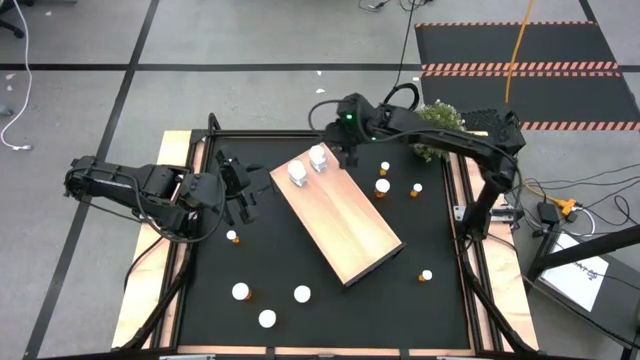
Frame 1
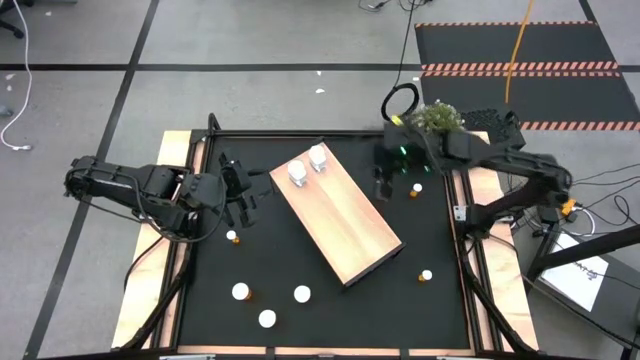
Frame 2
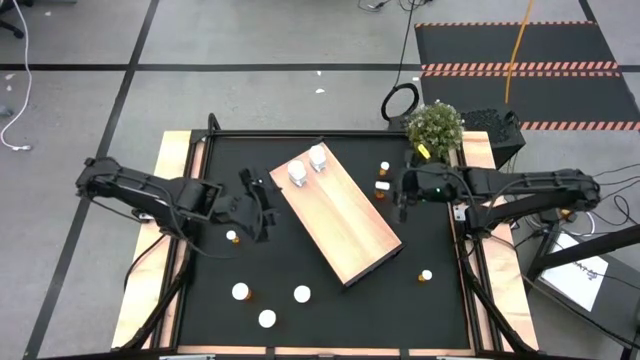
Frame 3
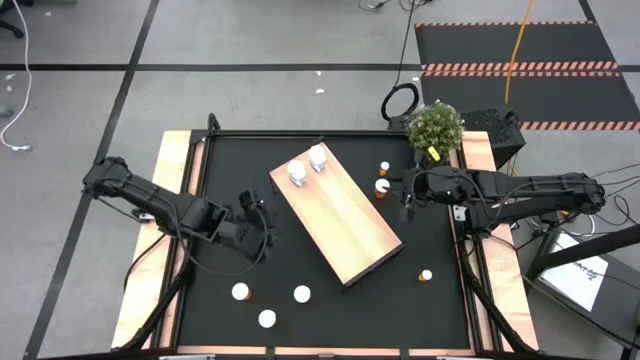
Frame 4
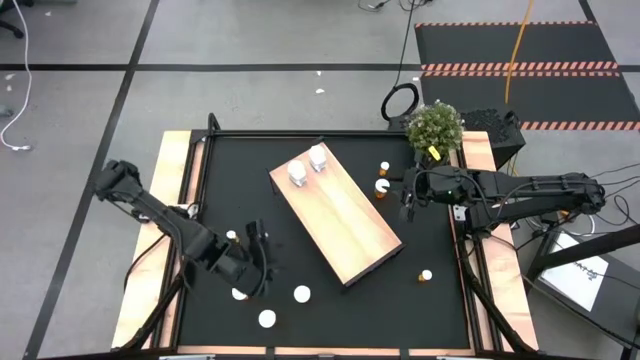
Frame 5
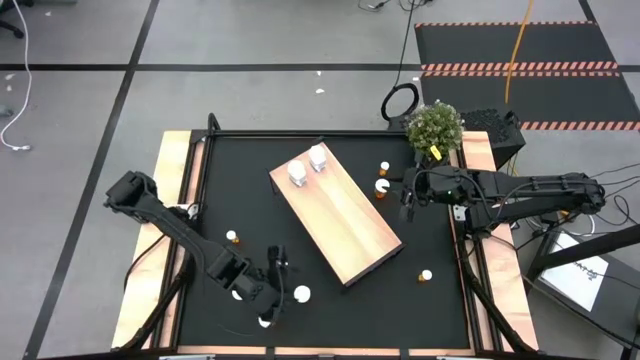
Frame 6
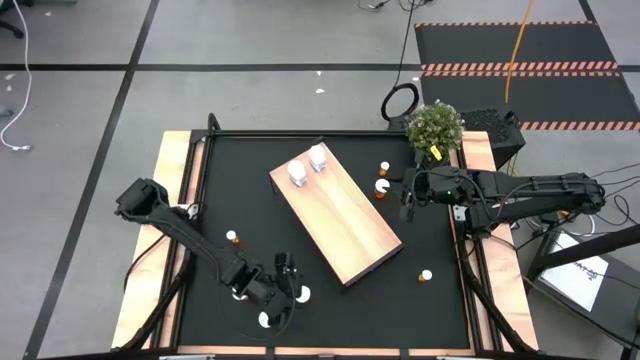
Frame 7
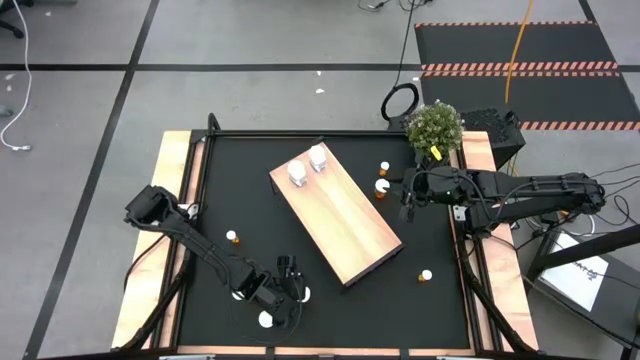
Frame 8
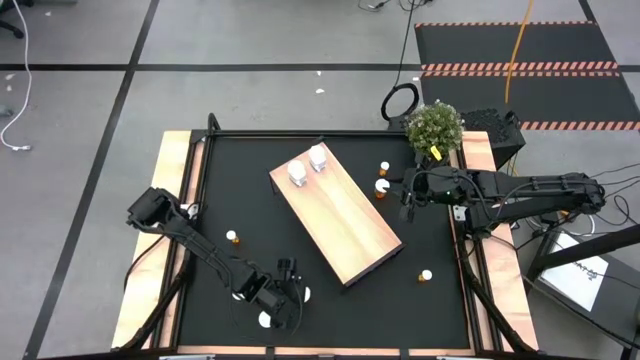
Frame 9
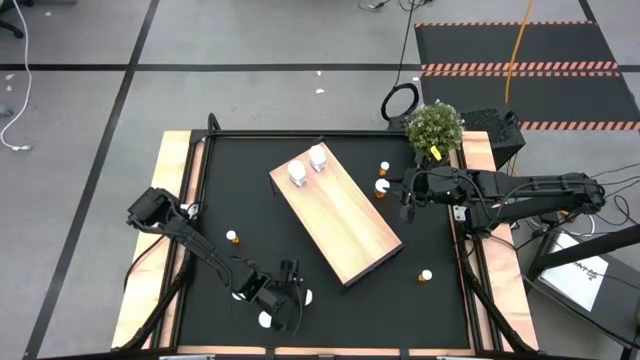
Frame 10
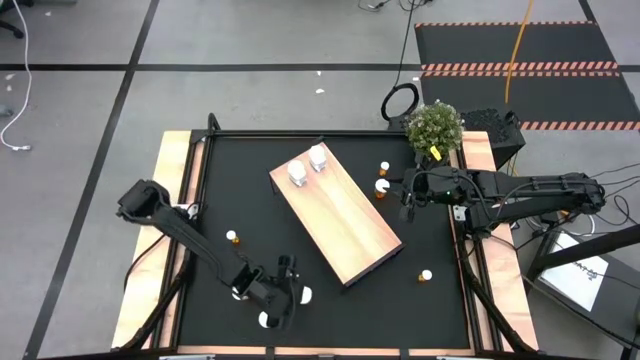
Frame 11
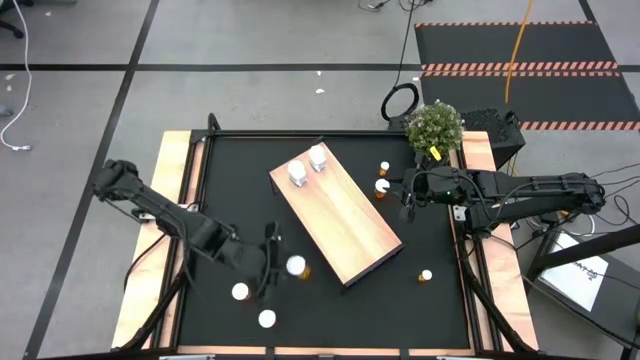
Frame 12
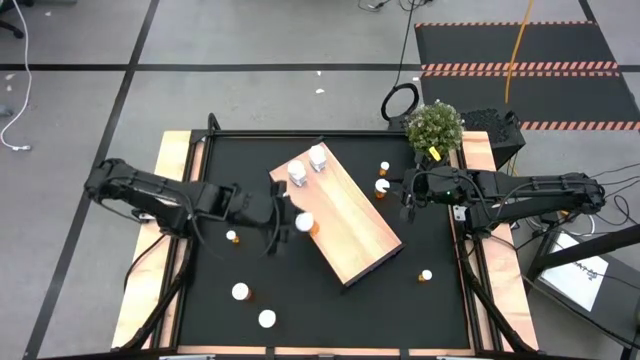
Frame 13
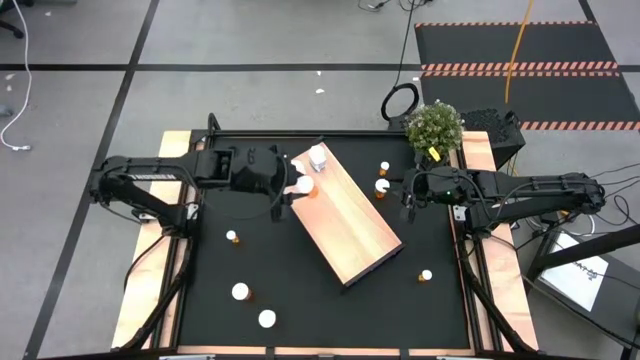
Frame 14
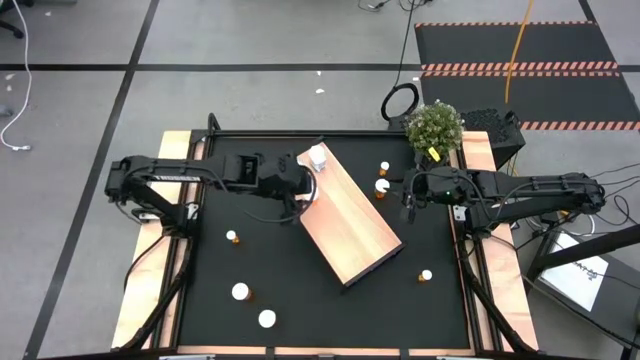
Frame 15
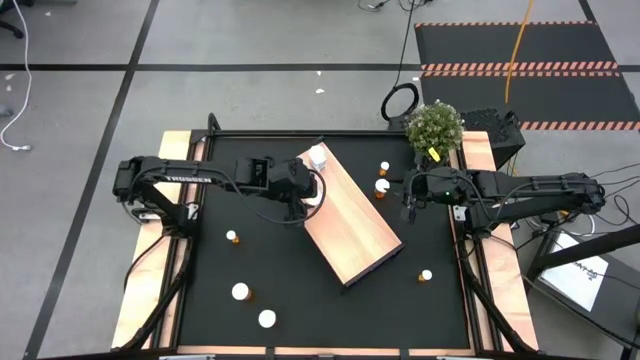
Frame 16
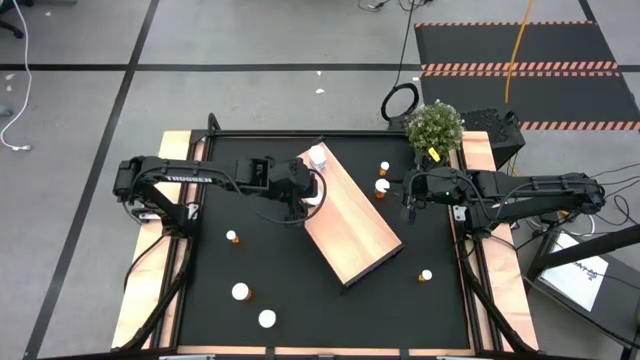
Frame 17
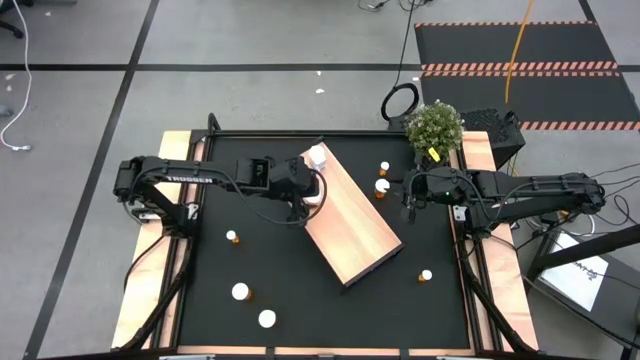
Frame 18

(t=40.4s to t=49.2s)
Task: Pick and place medicine bottles onto shelf by color
Put the orange capsule bottle on the shelf

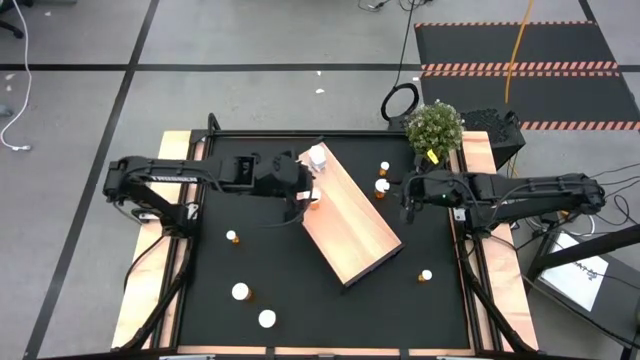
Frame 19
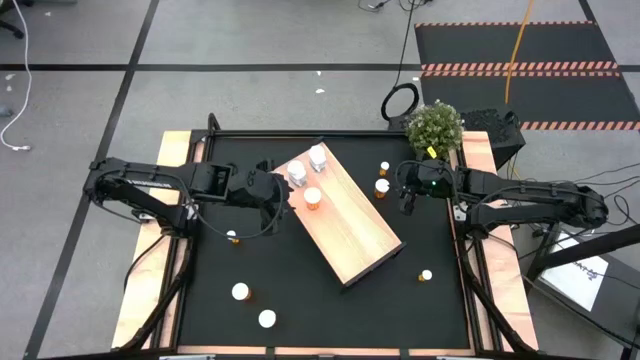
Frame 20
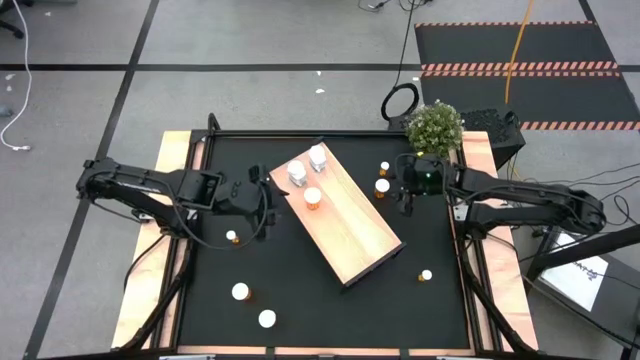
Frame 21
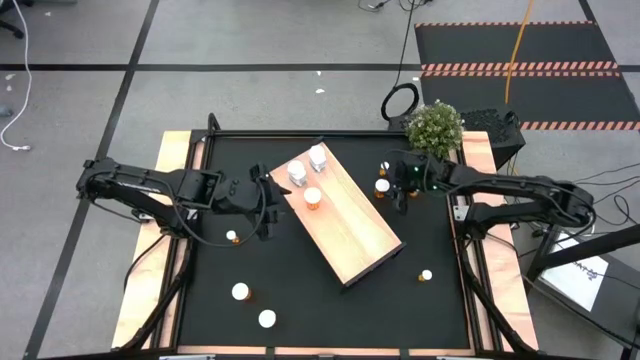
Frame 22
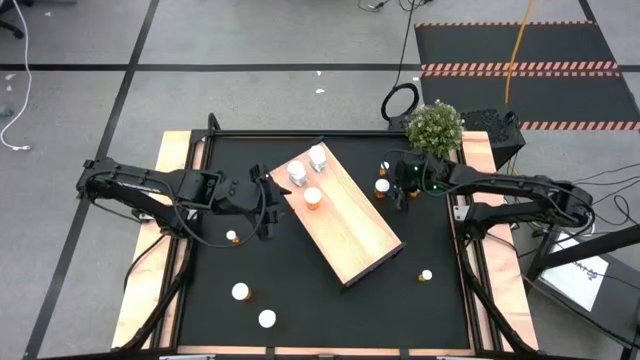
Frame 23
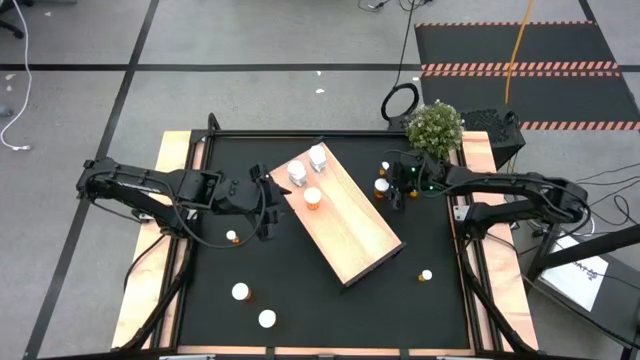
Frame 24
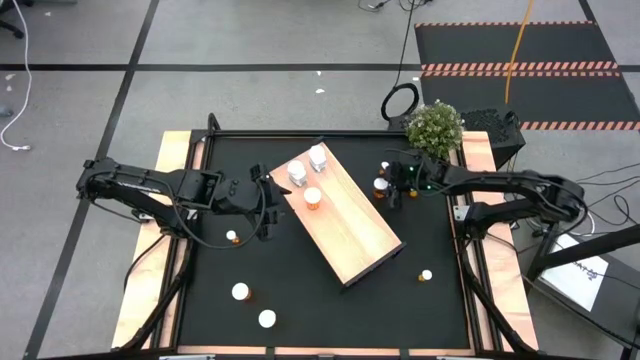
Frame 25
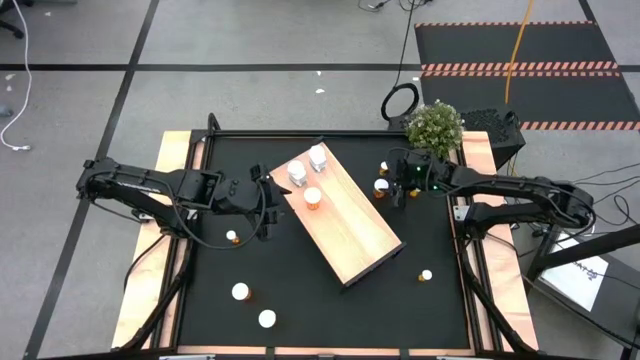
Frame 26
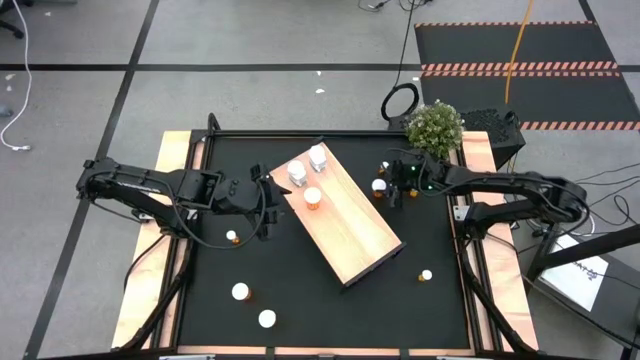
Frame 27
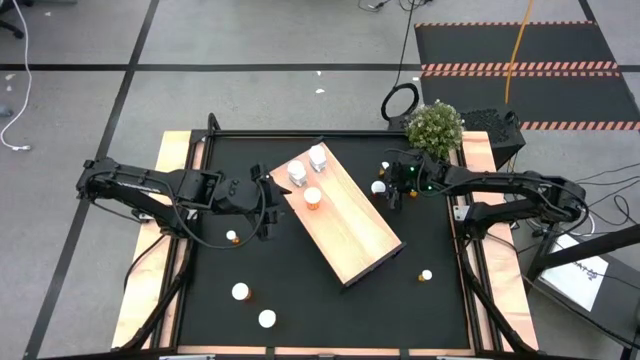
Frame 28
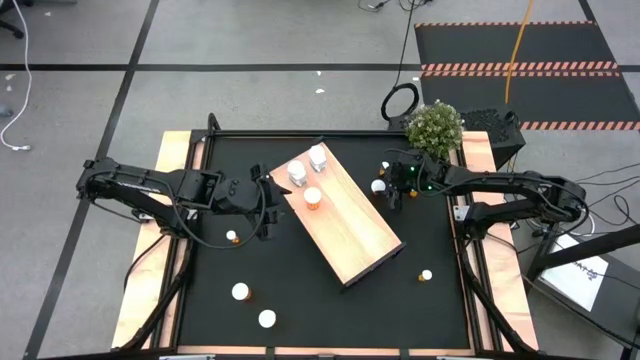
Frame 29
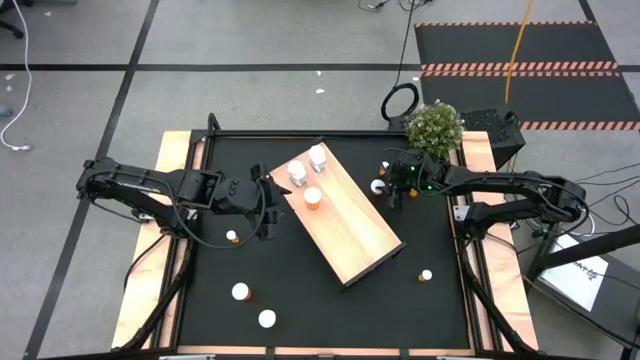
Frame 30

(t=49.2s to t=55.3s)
Put the top orange capsule bottle on the shelf aligned with the orange capsule bottle

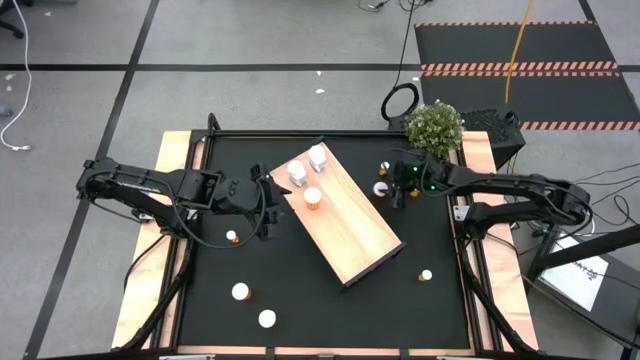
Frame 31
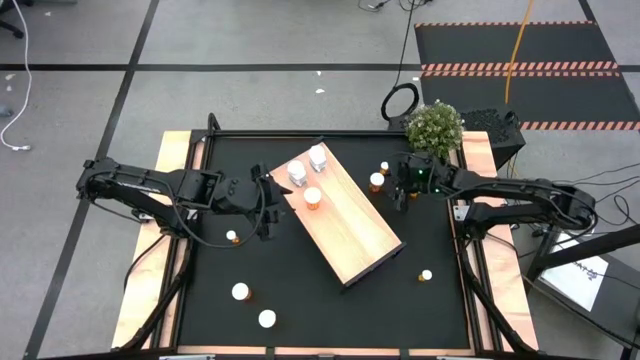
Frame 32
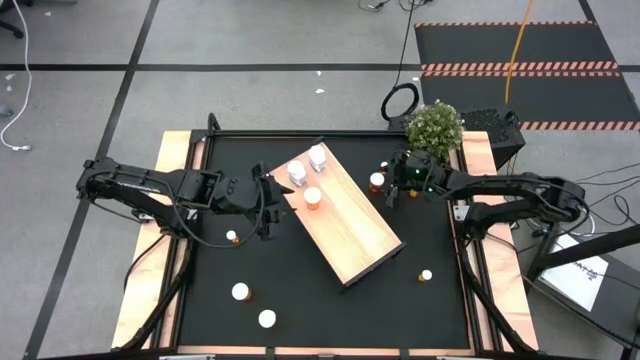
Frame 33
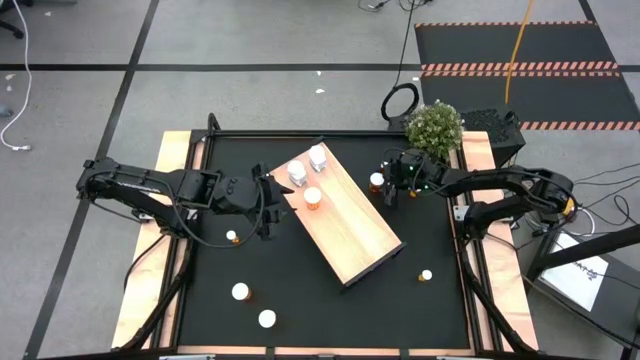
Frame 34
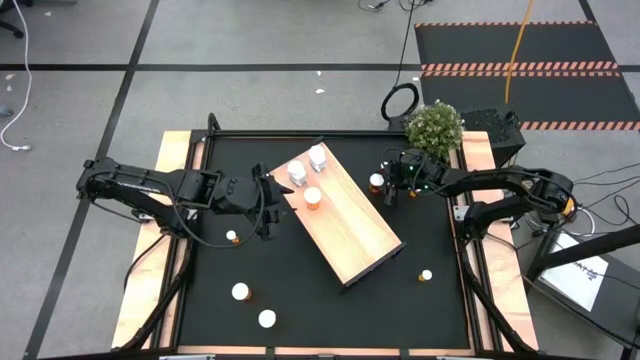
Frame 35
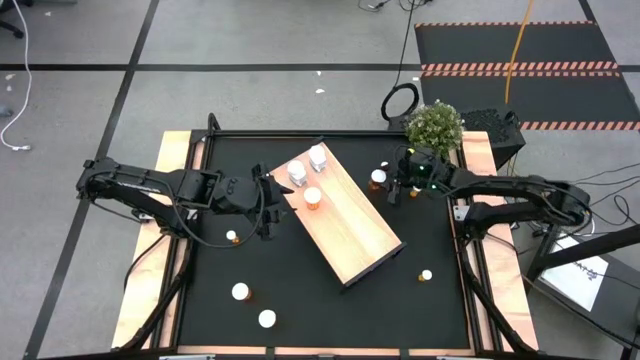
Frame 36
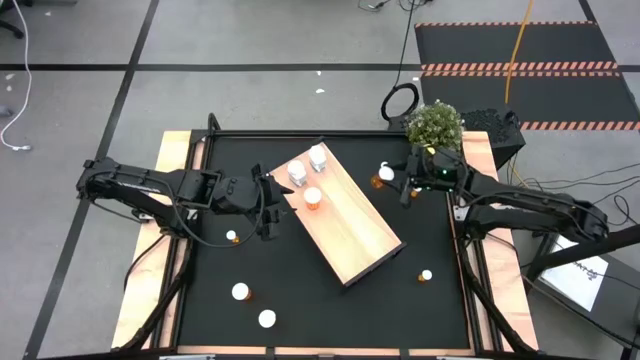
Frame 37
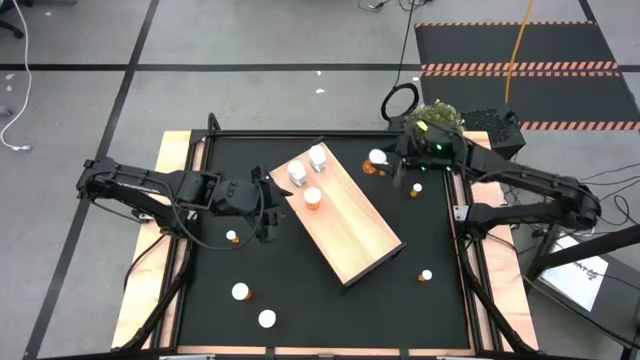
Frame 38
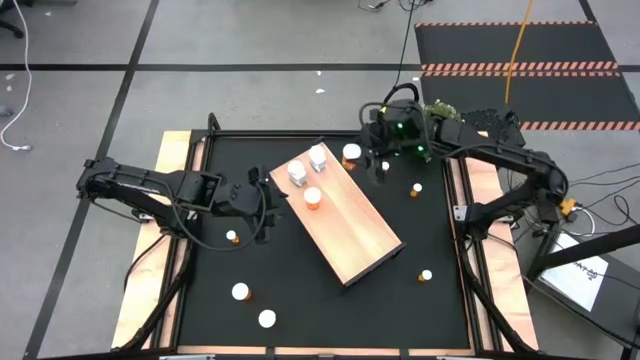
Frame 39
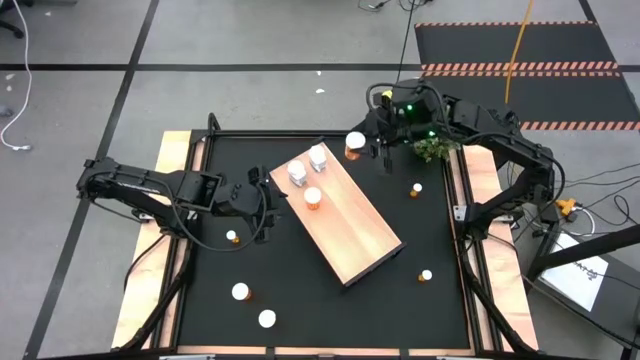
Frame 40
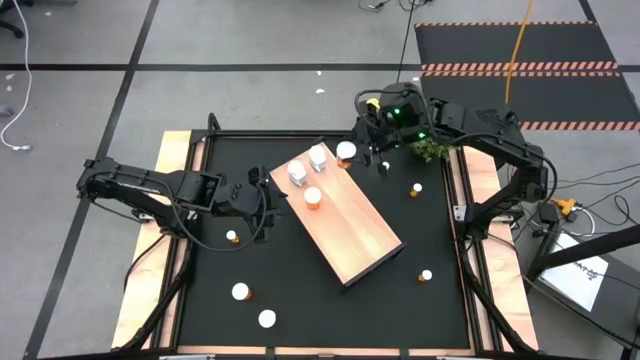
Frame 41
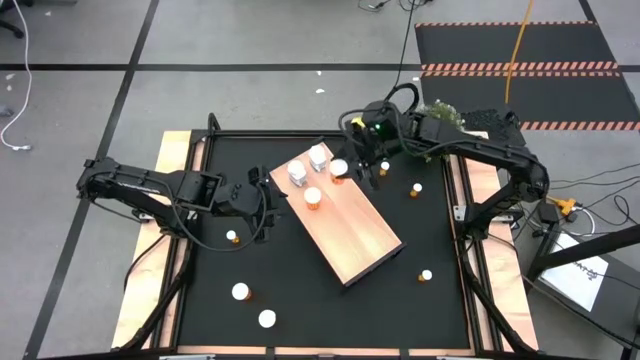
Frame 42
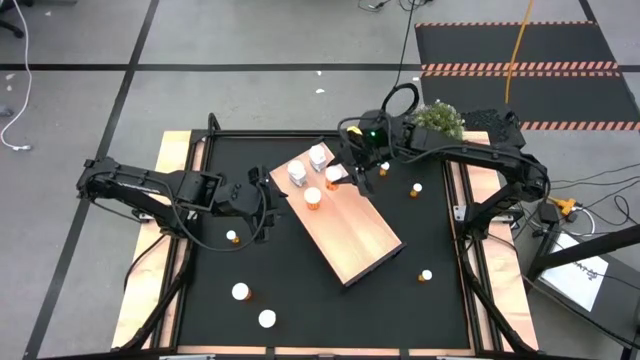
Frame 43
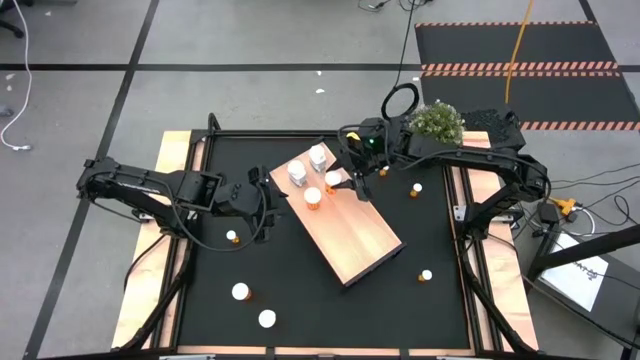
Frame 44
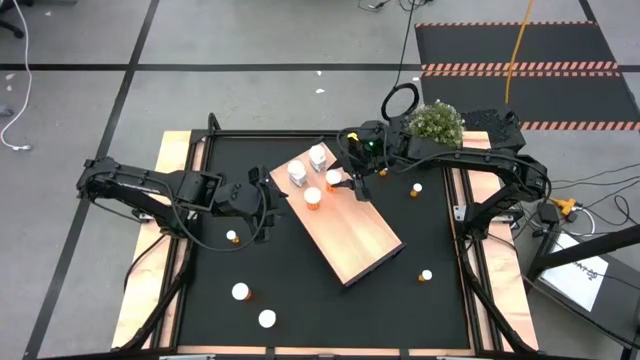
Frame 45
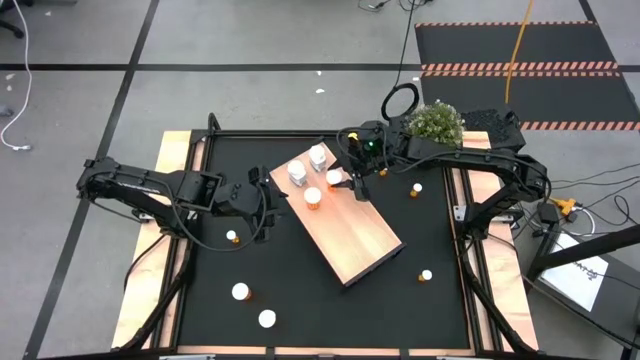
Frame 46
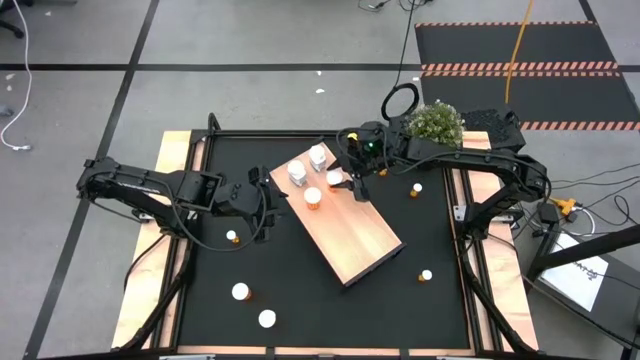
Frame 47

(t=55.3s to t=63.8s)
Put the top orange capsule bottle on the shelf aligned with the orange capsule bottle
